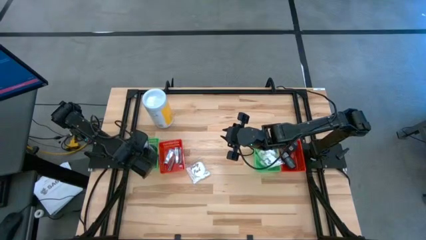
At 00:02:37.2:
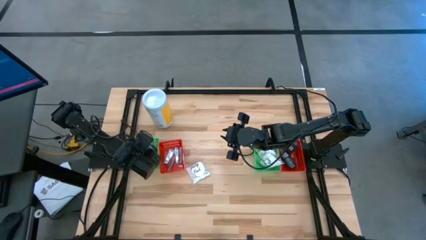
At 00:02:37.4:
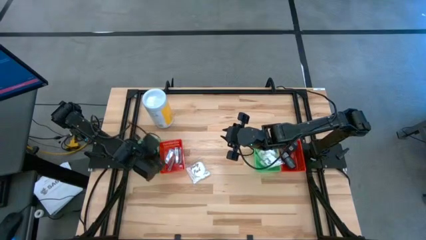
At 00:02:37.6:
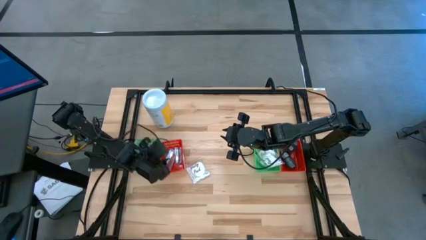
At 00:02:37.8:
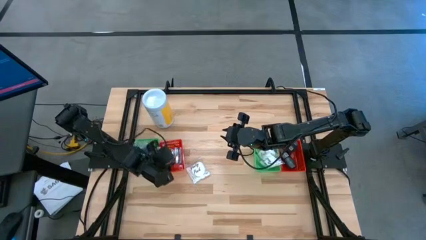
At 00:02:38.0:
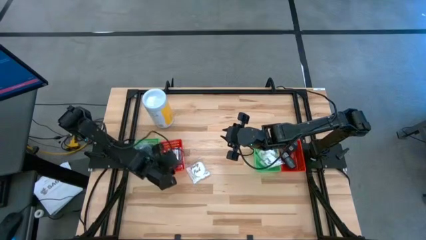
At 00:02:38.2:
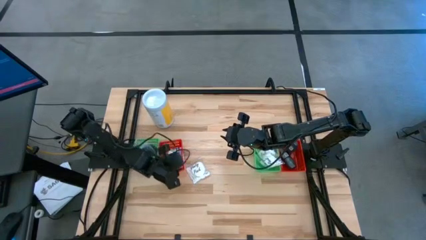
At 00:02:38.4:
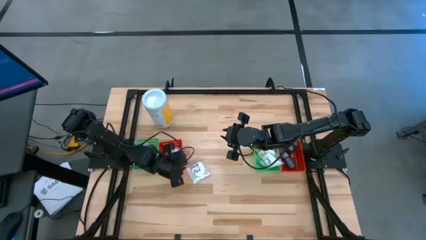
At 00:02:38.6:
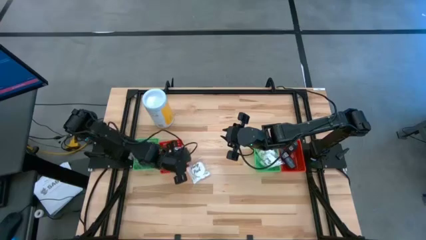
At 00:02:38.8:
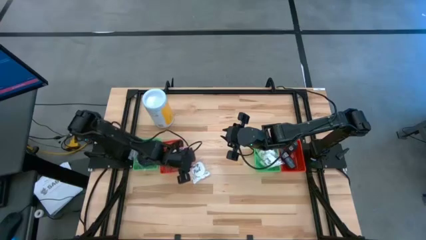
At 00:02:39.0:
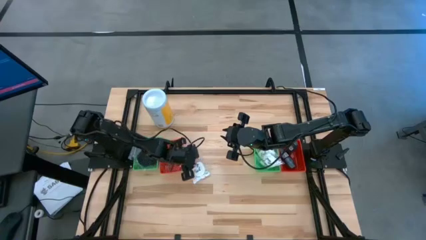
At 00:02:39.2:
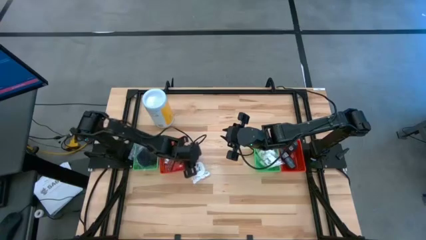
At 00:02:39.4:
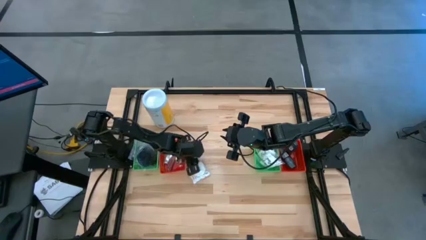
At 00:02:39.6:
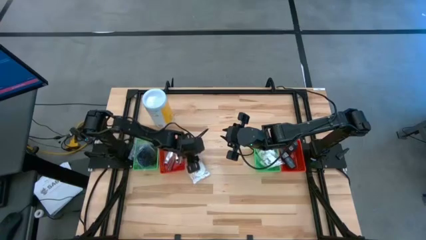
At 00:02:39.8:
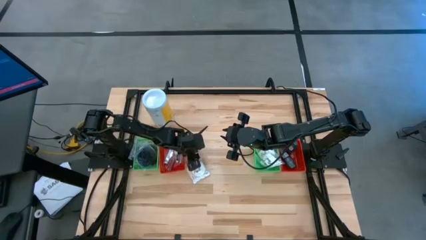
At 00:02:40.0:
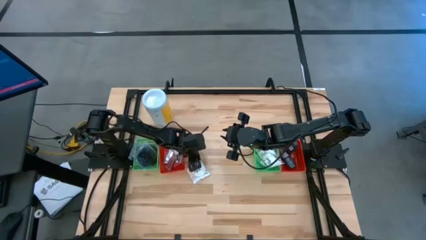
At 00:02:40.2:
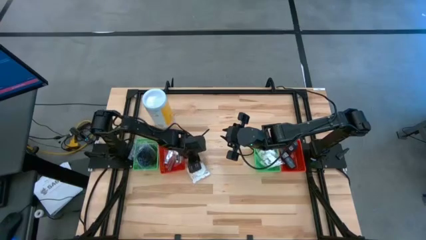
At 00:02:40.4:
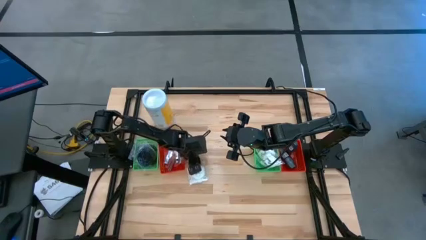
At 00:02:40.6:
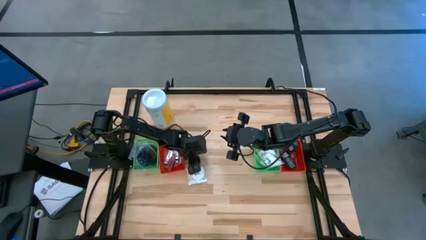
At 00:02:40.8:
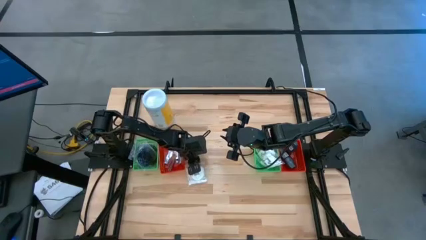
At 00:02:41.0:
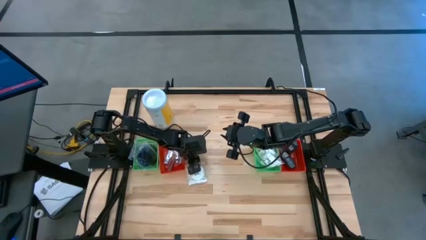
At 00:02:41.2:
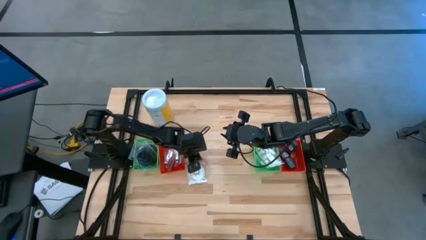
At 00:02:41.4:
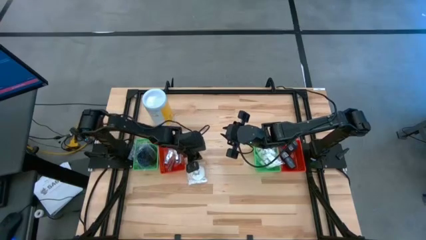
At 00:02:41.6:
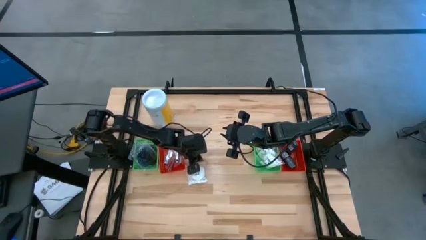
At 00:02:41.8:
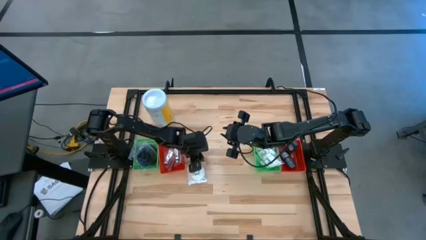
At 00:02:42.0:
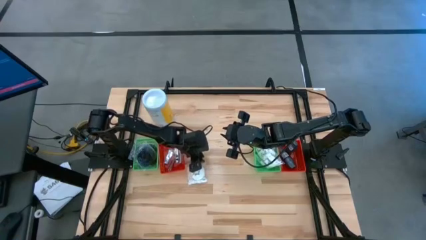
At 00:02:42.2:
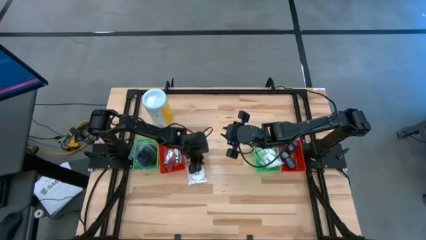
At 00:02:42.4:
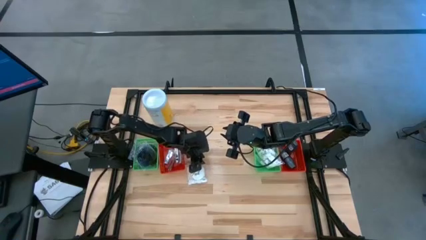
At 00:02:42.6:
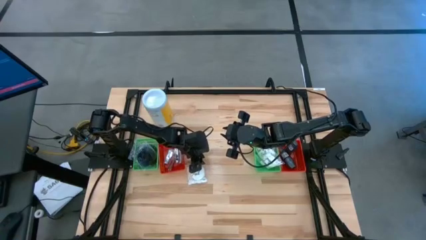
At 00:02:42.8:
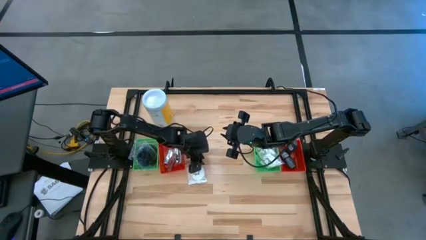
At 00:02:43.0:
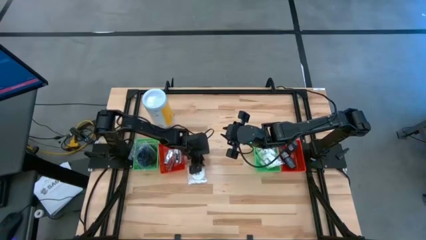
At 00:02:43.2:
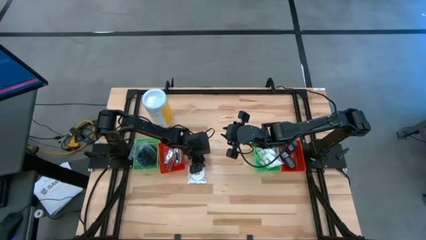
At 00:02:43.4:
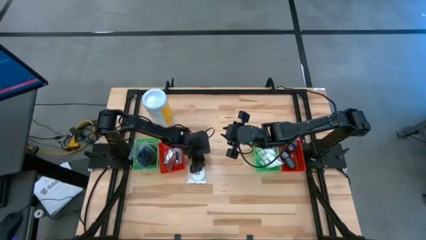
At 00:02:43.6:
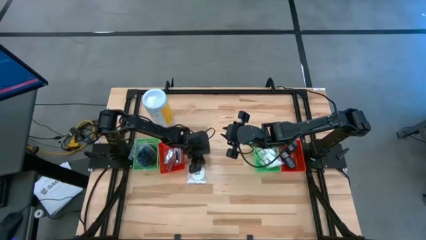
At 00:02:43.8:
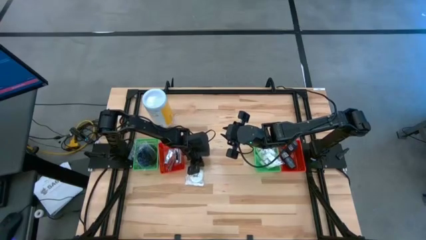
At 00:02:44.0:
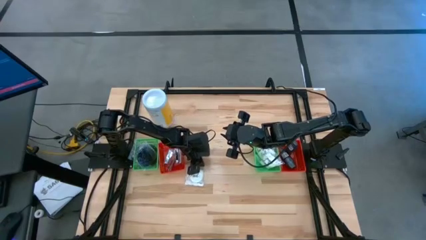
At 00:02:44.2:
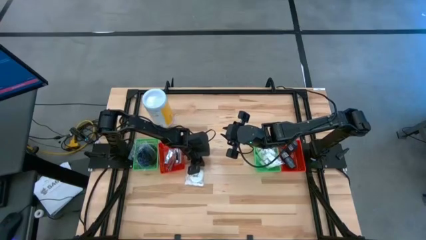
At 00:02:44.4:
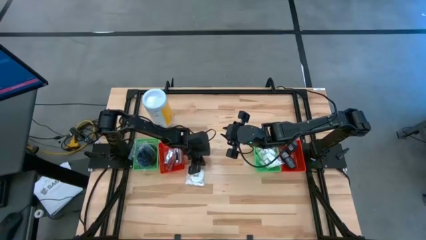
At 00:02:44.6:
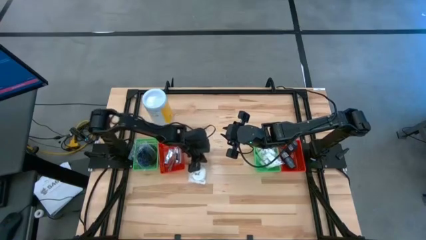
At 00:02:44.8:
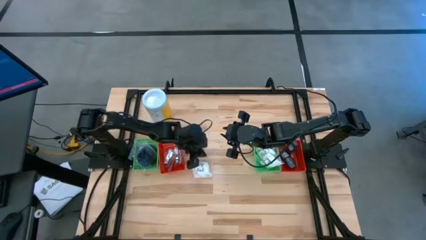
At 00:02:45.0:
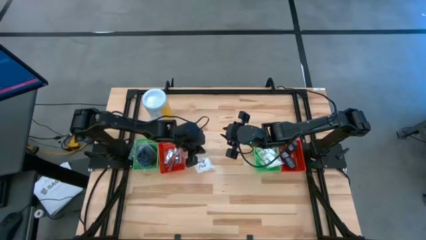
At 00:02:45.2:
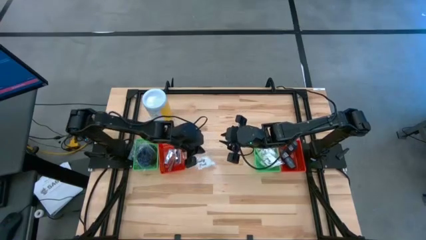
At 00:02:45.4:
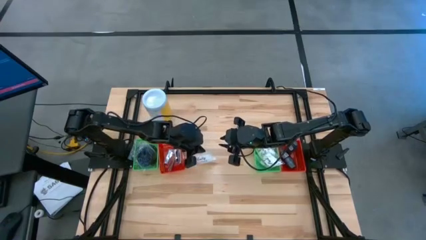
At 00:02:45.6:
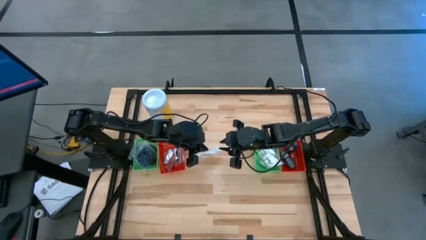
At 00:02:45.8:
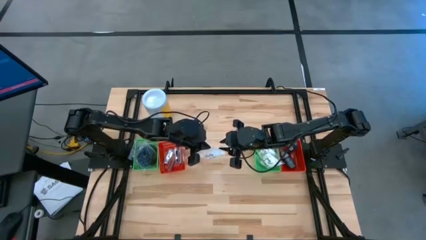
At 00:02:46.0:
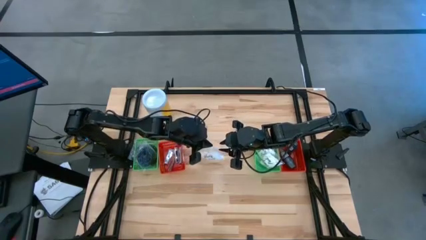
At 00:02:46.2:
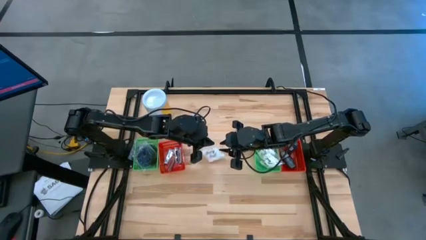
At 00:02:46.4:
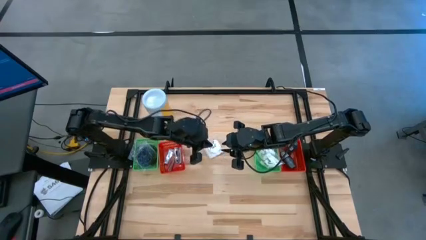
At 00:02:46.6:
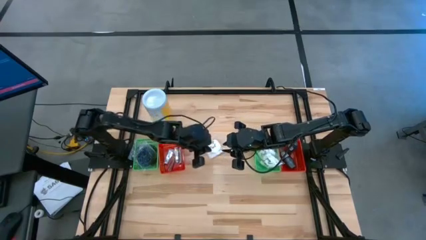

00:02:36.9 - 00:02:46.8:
Task: Pick & Place Travel size toiletries
Put the white cotton pack into the right green bin

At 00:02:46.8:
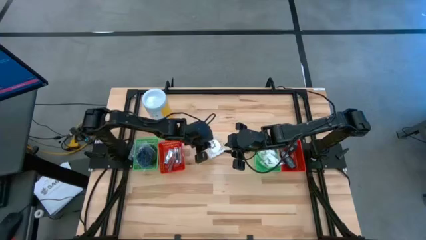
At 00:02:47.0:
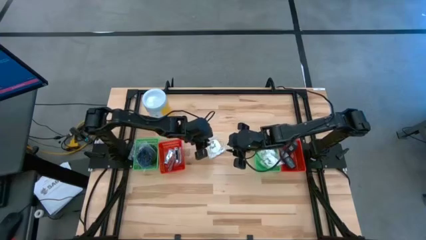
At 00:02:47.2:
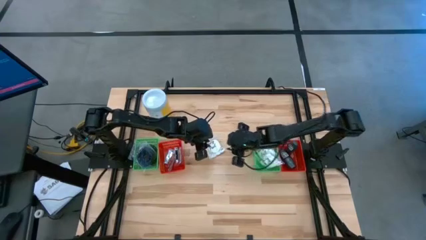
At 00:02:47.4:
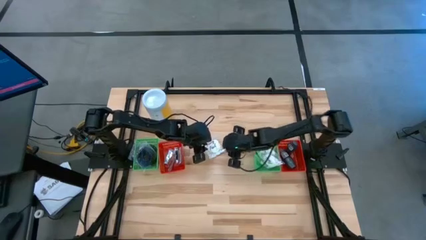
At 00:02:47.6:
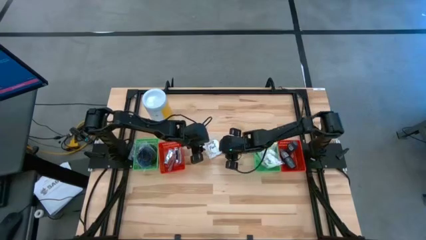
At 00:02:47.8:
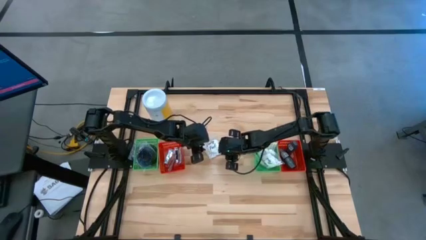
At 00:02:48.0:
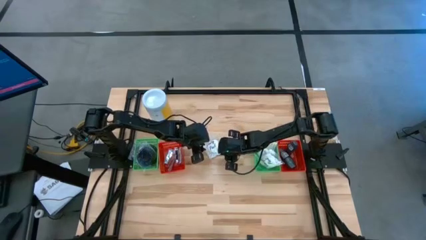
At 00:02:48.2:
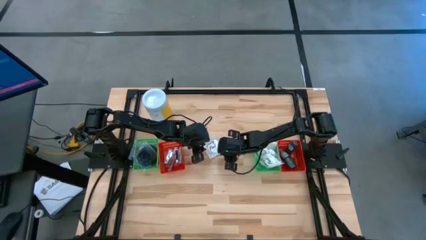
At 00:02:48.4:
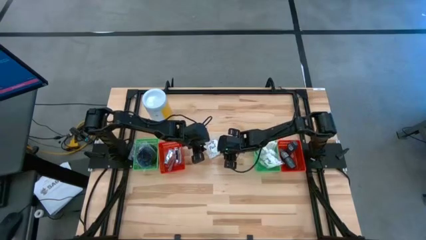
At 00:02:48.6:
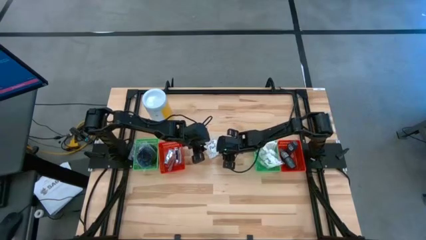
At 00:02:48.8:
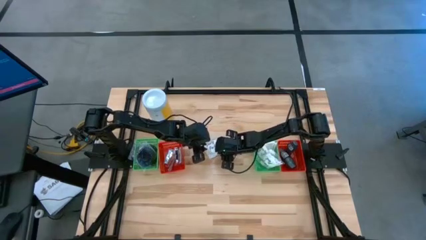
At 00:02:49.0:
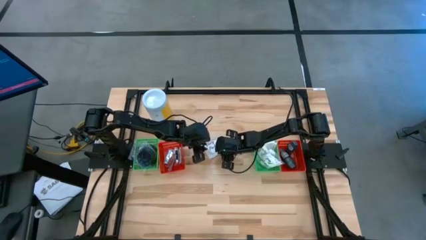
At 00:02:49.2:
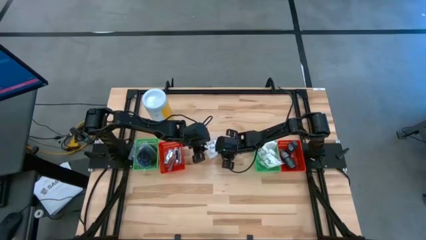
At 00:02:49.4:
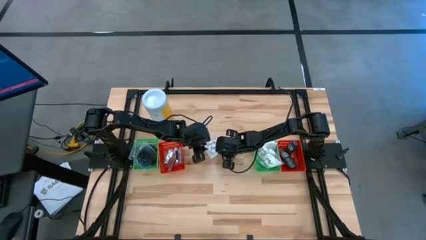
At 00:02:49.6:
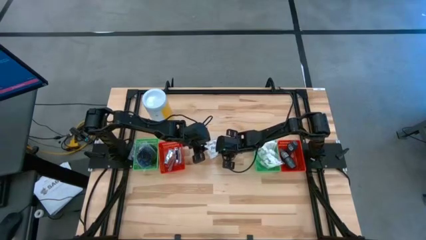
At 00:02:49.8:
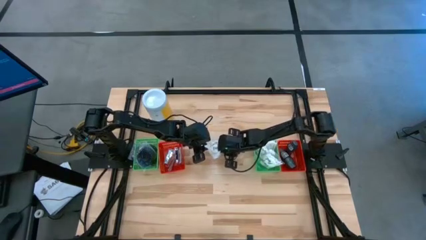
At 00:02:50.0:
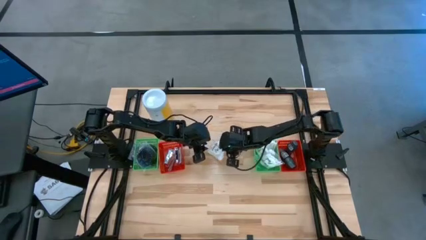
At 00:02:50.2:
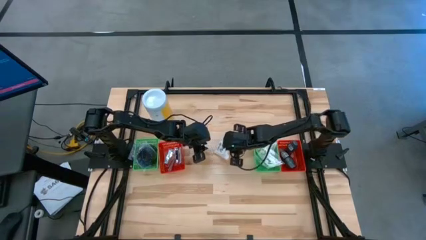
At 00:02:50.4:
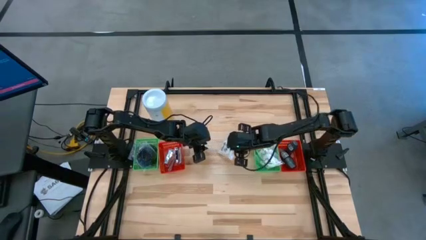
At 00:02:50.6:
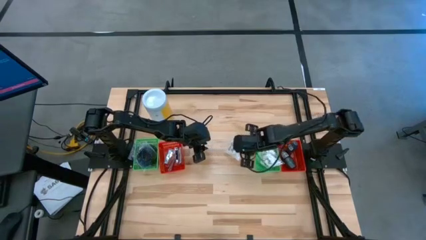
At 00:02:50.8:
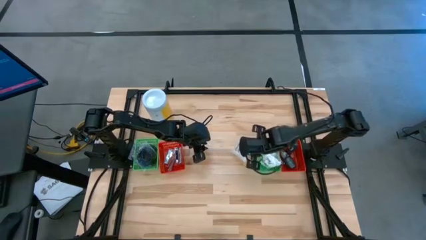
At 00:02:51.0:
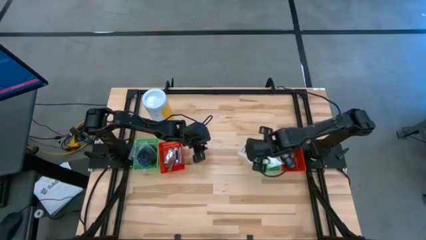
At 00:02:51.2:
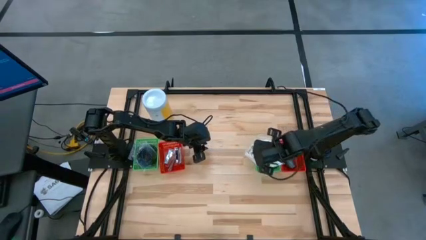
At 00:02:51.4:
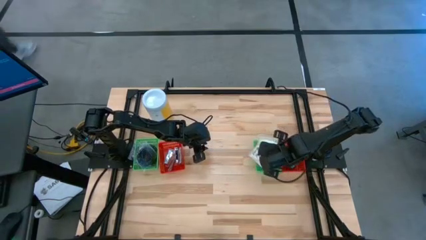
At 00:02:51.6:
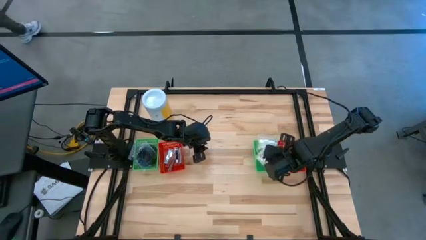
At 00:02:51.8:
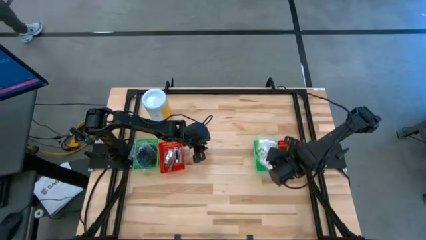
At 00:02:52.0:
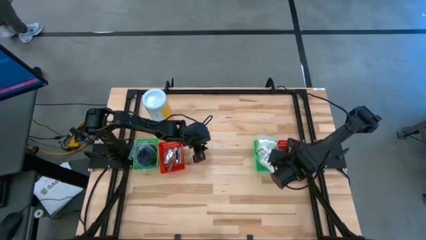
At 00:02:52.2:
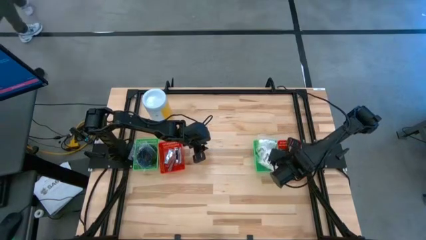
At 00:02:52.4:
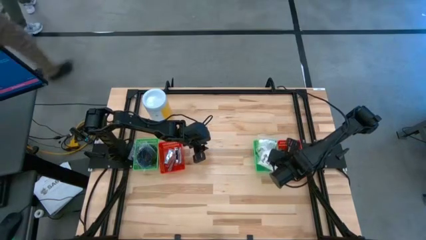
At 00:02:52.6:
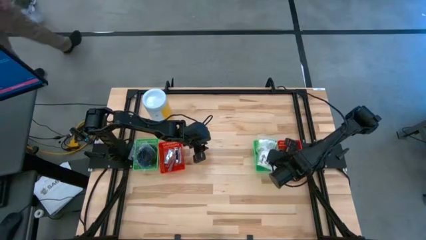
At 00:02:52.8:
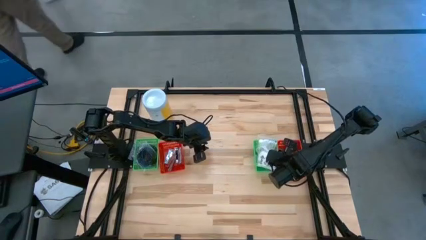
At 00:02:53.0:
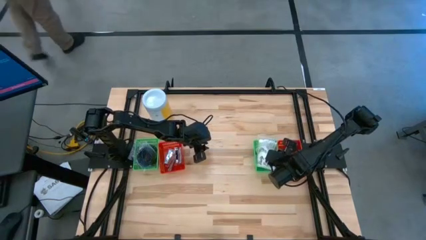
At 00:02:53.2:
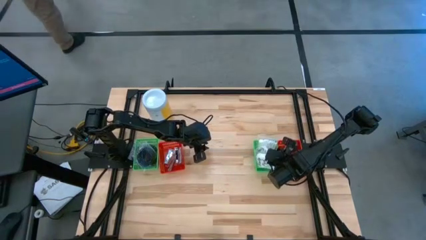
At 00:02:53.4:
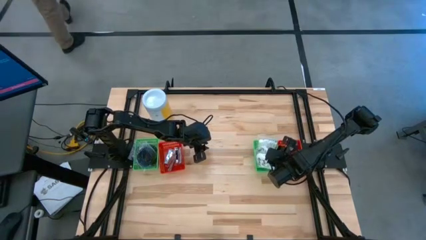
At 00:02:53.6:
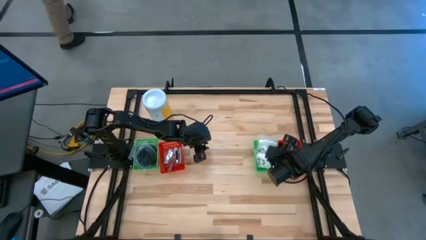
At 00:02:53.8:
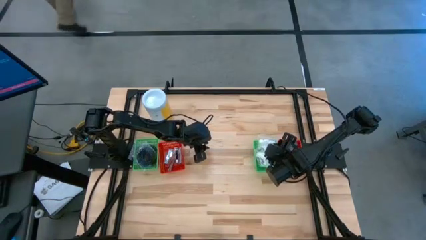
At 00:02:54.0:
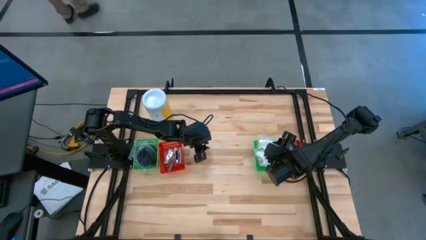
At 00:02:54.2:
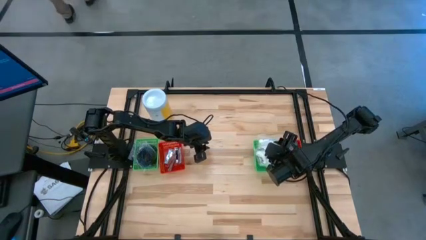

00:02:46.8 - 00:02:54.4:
Put the white cotton pack into the right green bin
